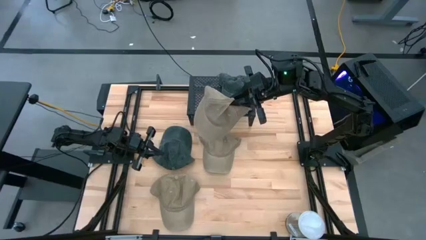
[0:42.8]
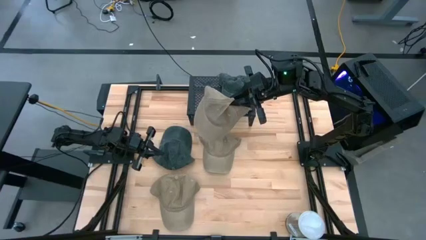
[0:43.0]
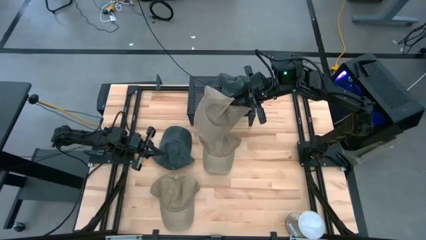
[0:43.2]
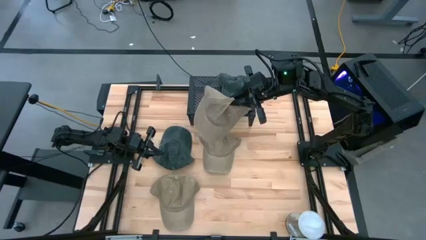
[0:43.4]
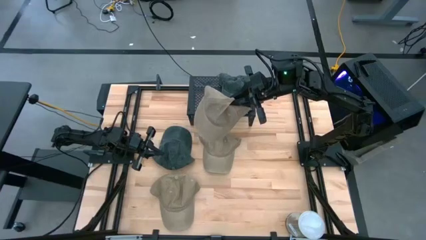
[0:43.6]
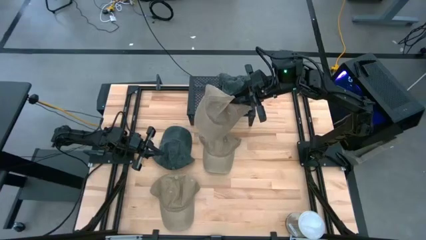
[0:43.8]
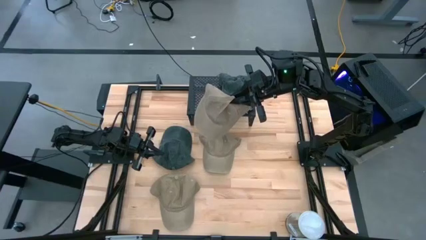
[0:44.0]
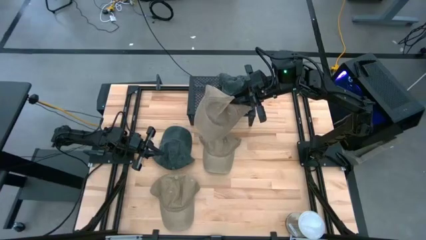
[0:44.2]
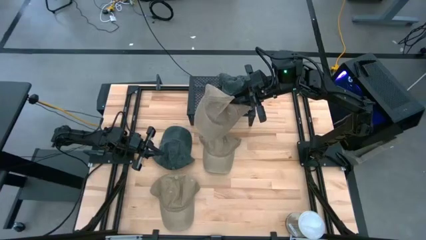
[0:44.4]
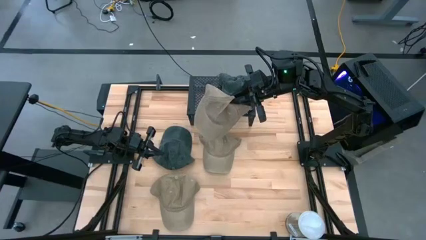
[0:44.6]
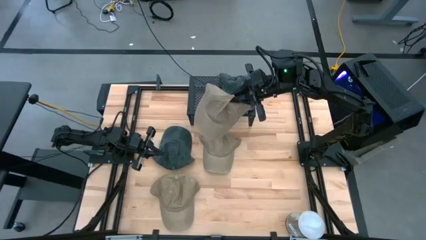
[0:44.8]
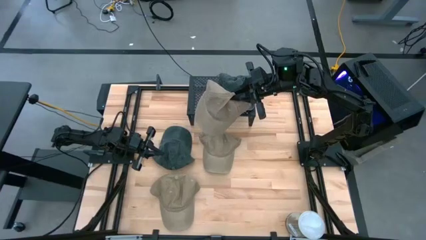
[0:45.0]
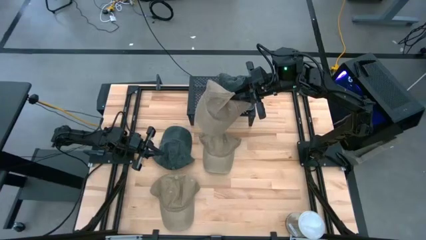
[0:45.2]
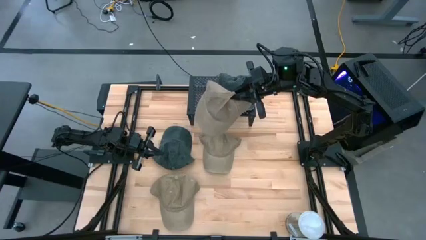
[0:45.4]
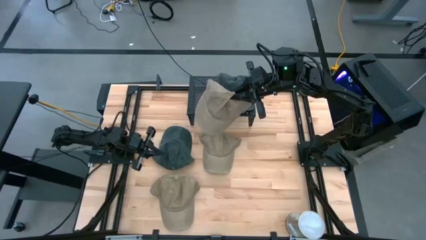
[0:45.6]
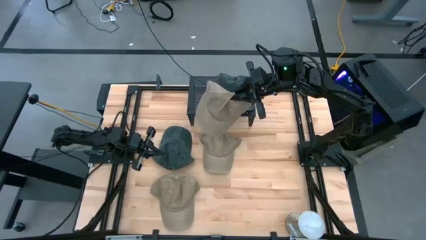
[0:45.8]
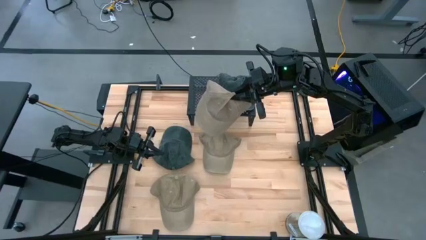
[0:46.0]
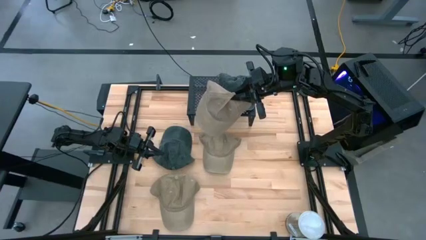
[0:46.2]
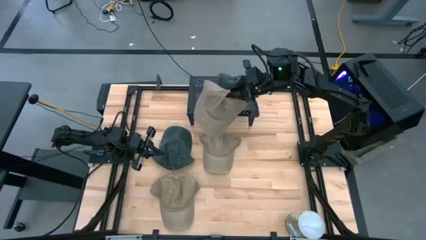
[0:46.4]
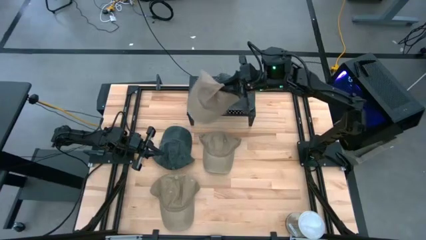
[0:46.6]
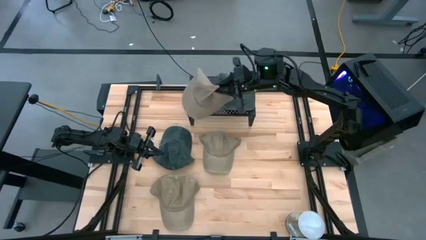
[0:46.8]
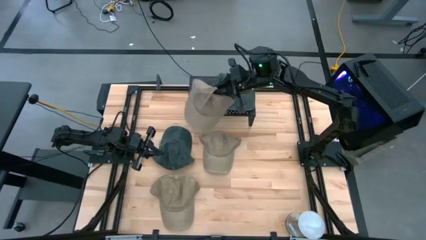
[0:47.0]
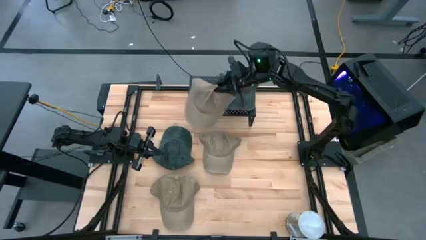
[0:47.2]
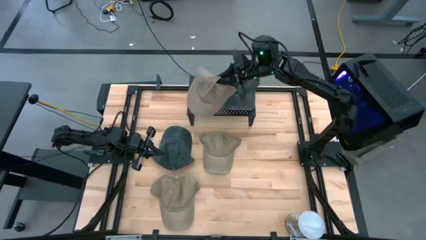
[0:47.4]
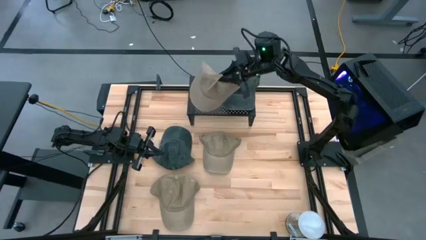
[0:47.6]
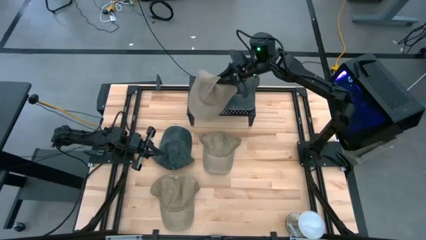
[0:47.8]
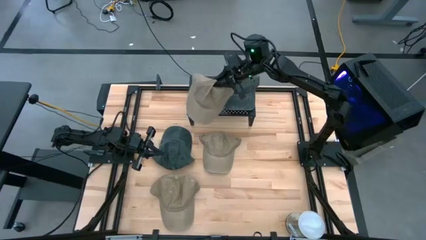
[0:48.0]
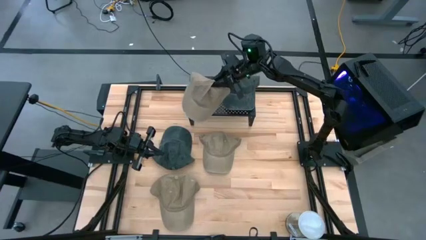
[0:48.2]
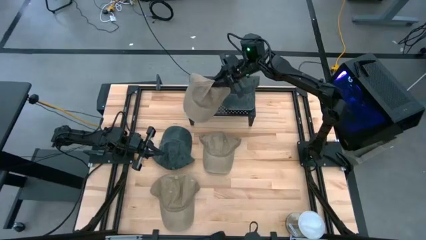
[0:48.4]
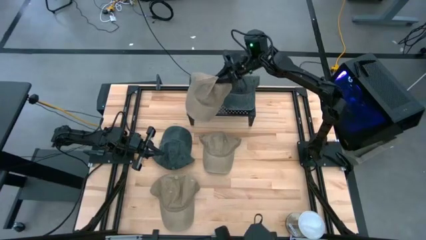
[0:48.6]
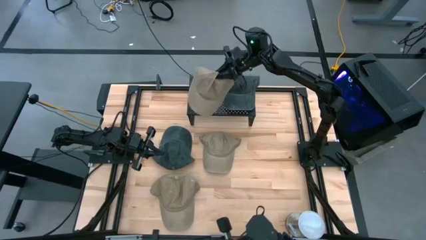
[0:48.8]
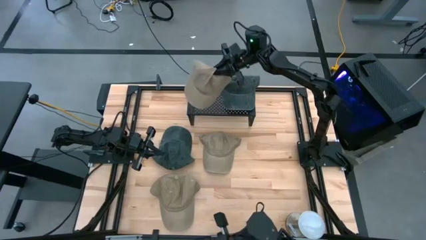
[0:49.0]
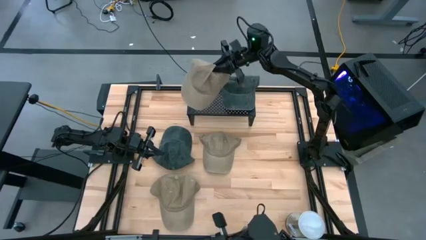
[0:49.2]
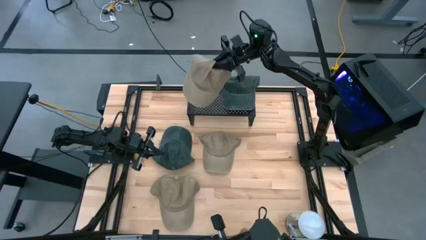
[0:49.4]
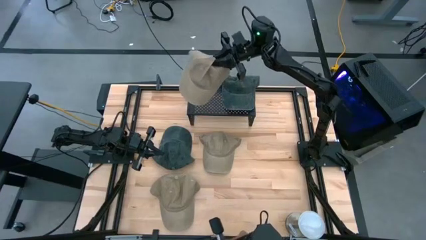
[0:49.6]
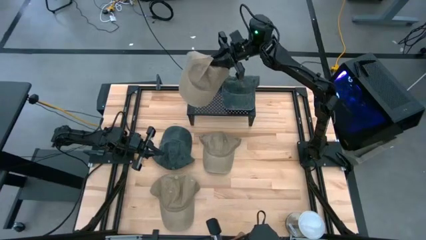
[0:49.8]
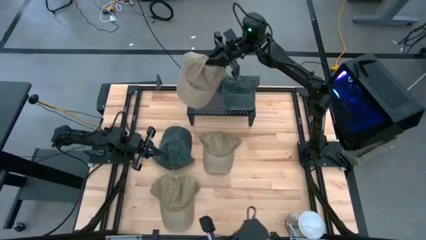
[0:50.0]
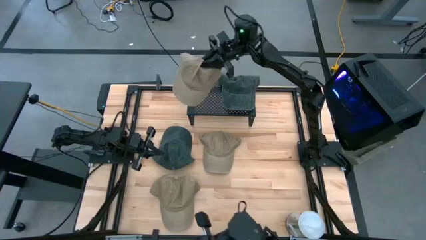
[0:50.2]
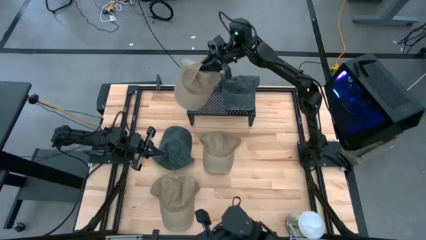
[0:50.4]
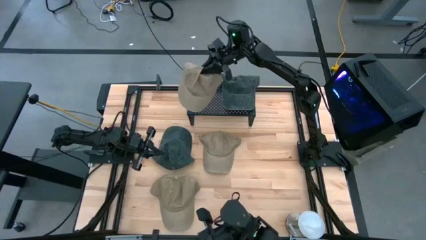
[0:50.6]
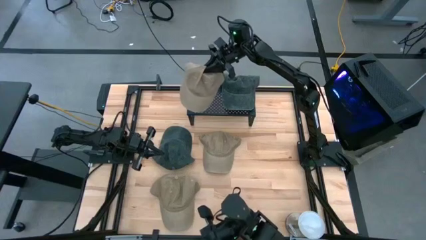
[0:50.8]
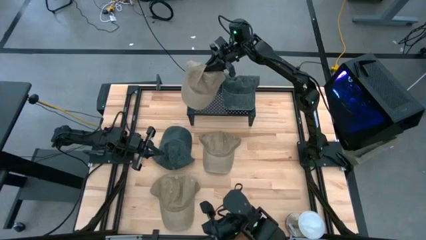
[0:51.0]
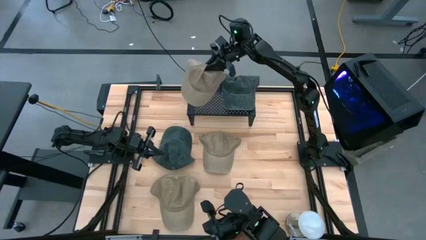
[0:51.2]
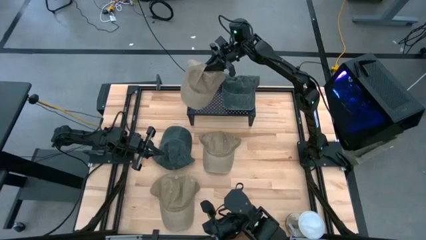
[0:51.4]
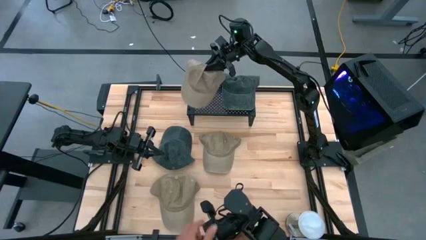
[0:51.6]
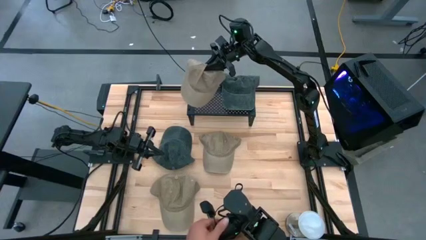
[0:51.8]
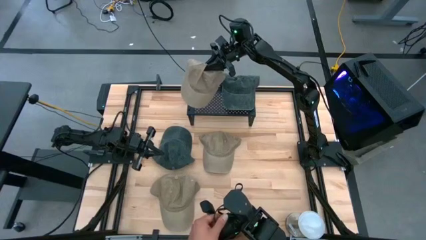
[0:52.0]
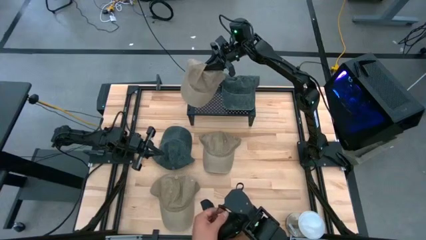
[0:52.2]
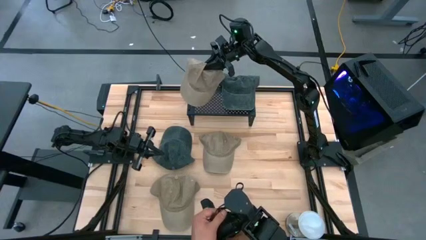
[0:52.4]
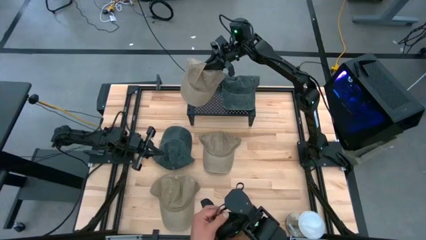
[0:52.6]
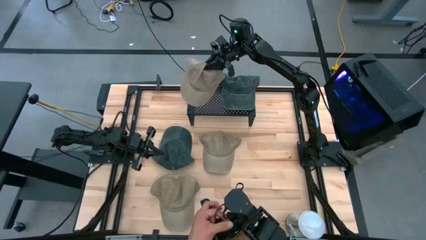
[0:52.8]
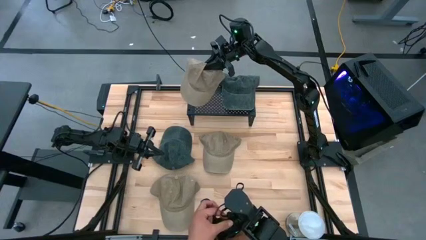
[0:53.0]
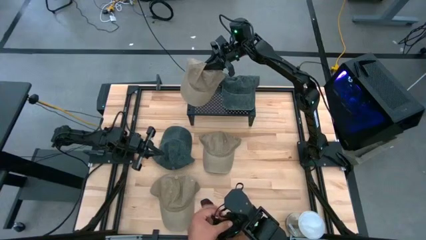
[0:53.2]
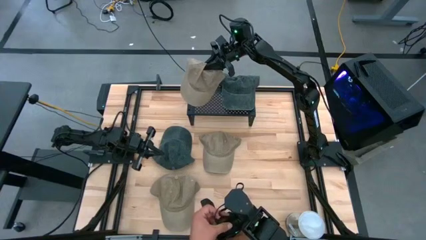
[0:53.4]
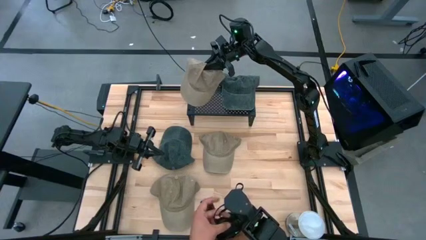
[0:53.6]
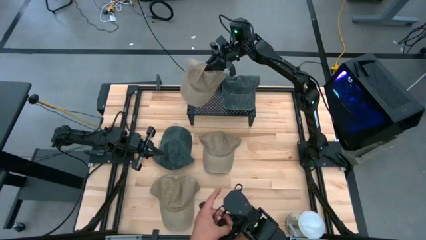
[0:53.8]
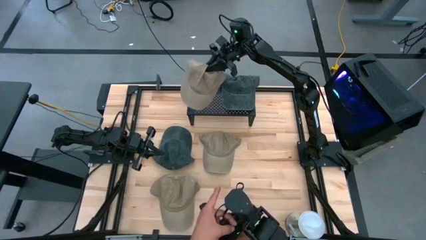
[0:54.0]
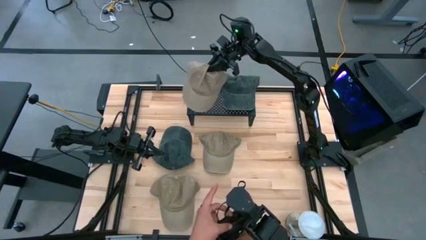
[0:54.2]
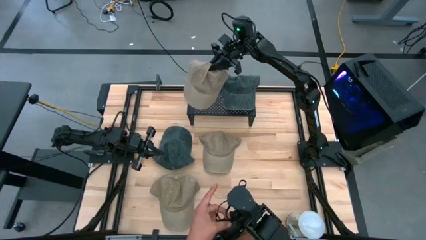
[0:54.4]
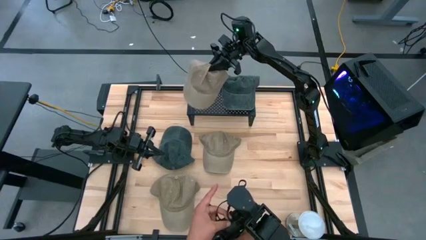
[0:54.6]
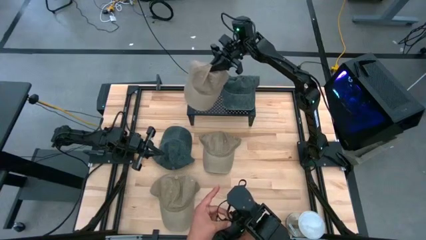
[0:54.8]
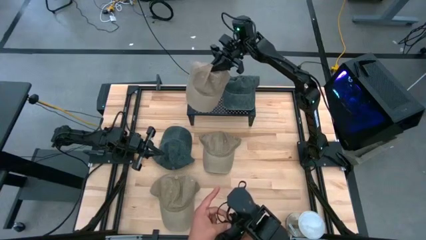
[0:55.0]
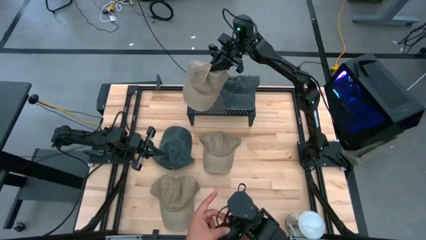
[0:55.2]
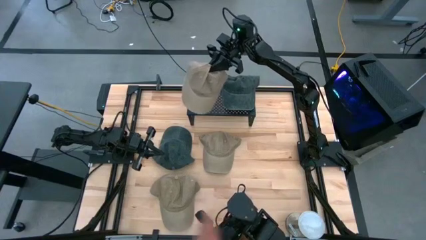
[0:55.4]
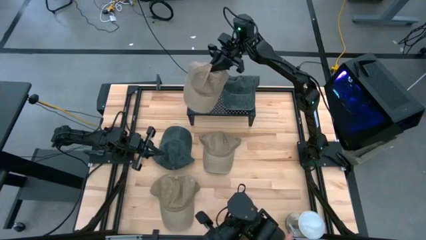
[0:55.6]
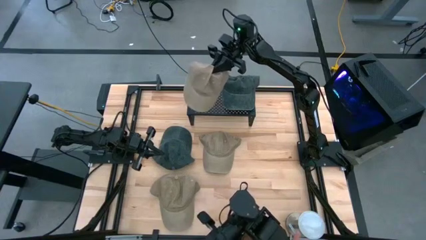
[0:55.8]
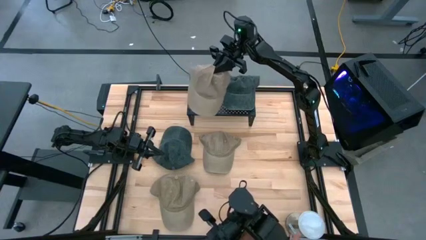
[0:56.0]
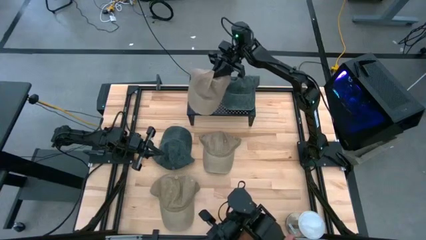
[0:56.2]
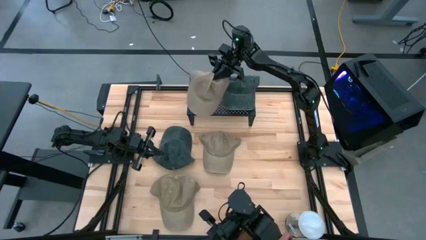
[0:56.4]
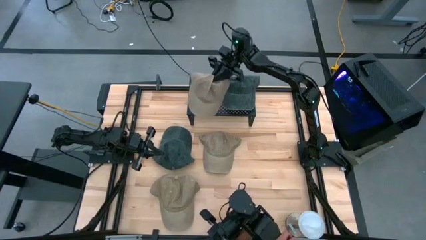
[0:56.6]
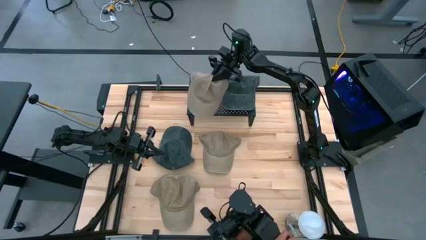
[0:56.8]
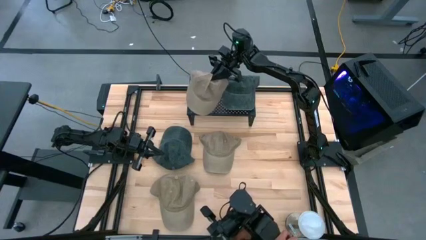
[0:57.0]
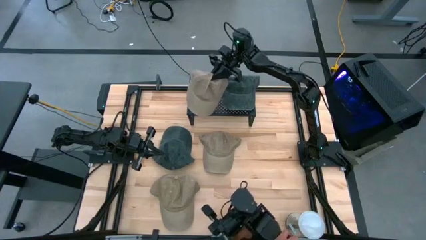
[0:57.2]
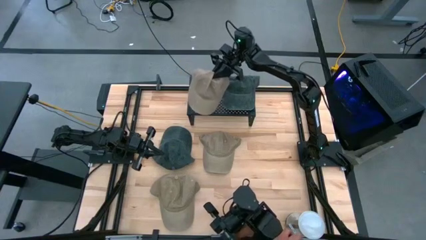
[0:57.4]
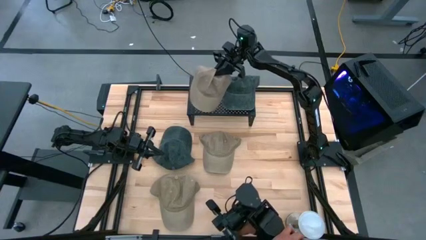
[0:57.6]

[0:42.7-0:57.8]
Task: Pick & Place hat
Put the bottom right brown cap on the shelf
